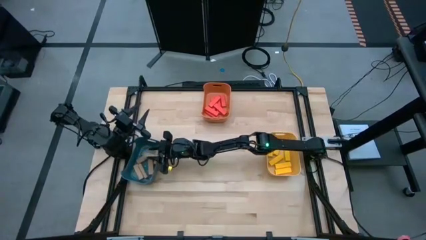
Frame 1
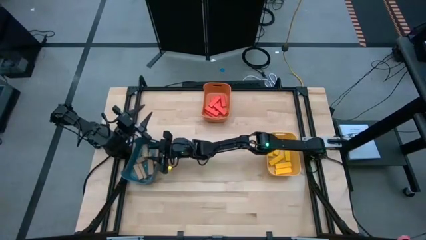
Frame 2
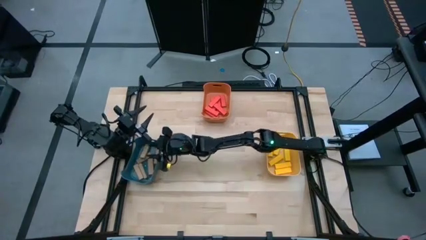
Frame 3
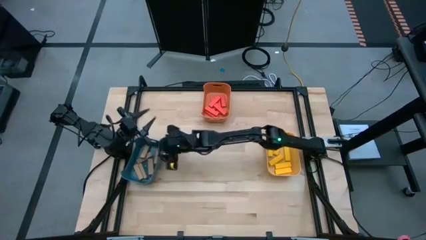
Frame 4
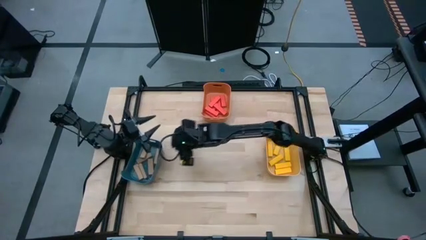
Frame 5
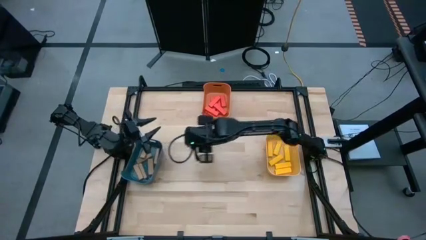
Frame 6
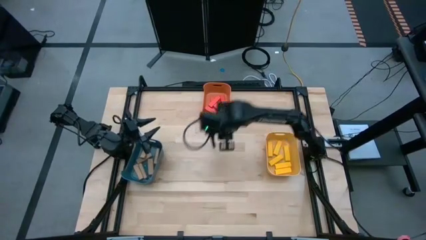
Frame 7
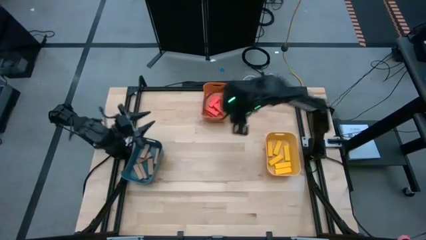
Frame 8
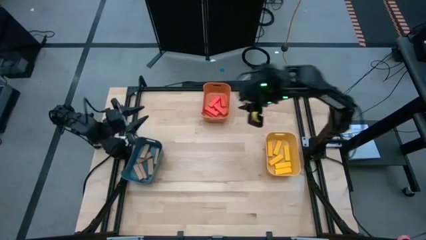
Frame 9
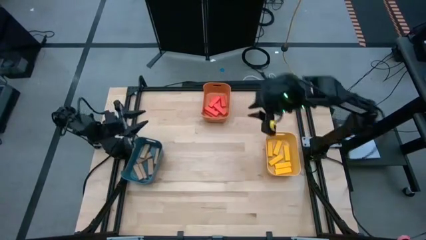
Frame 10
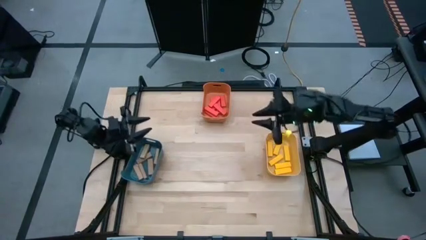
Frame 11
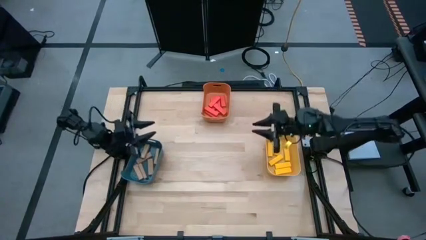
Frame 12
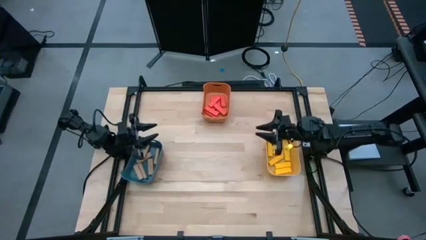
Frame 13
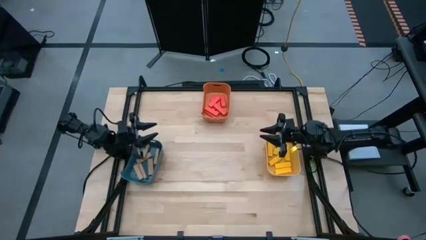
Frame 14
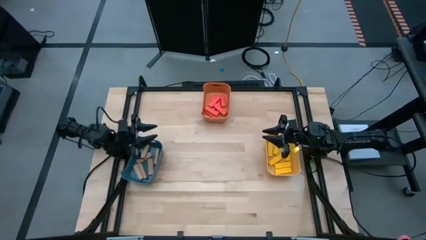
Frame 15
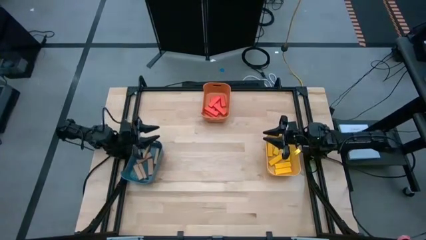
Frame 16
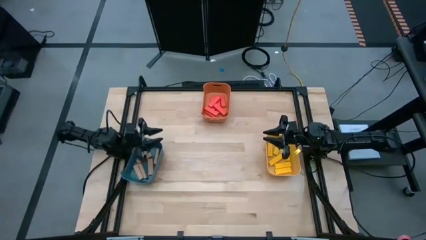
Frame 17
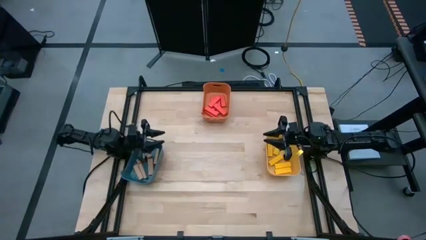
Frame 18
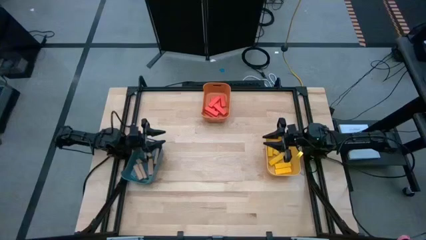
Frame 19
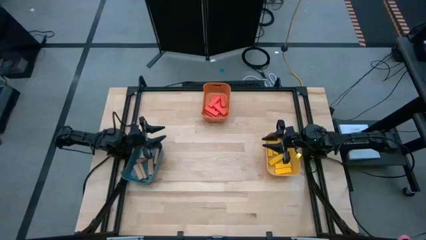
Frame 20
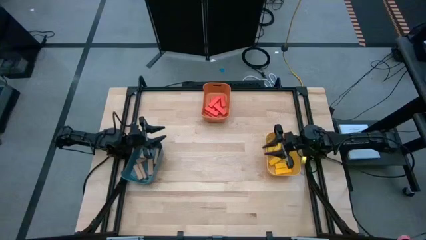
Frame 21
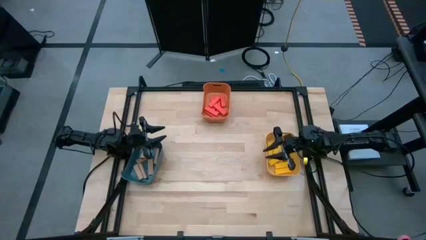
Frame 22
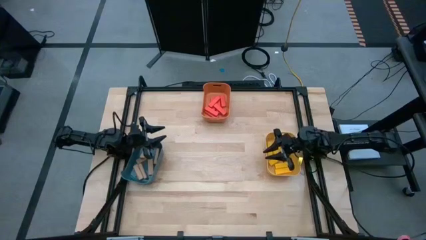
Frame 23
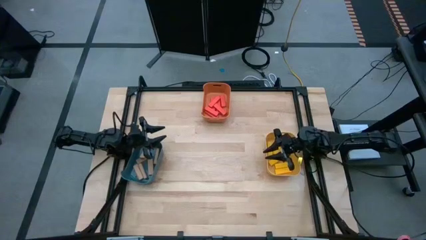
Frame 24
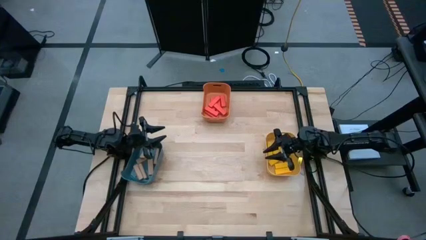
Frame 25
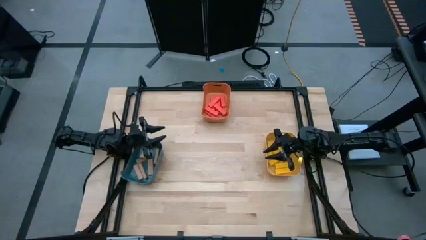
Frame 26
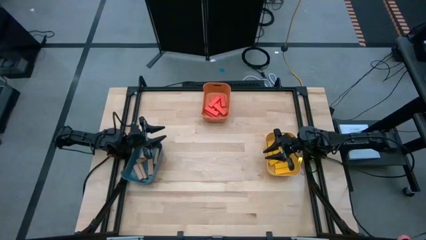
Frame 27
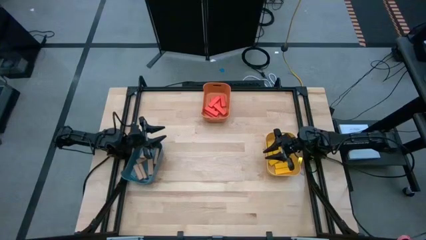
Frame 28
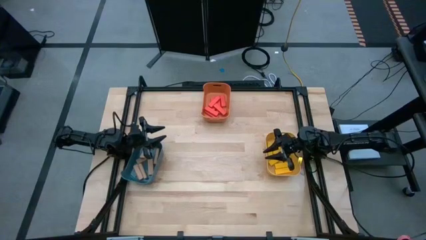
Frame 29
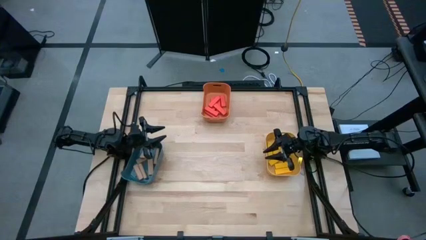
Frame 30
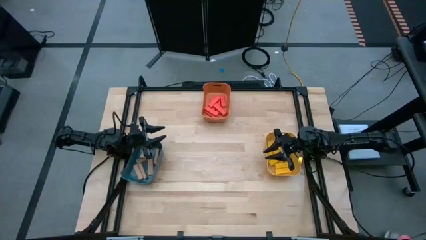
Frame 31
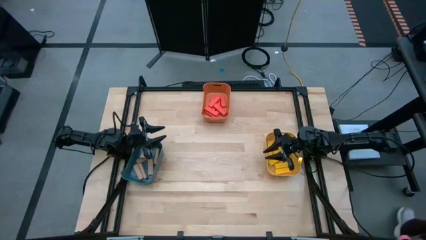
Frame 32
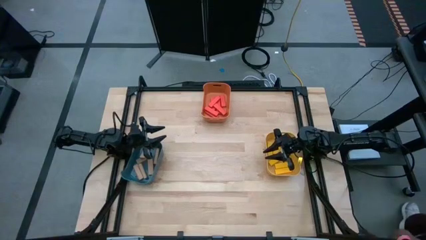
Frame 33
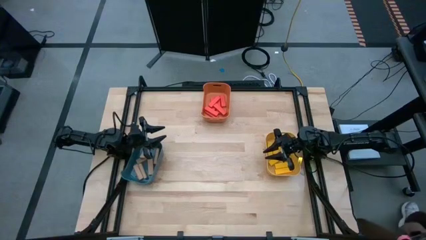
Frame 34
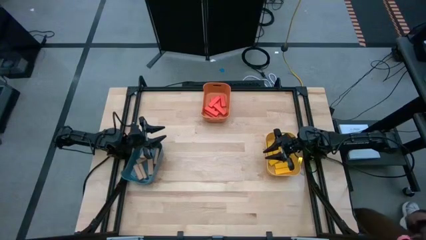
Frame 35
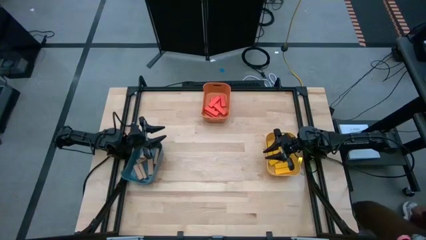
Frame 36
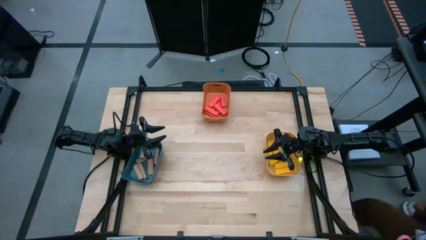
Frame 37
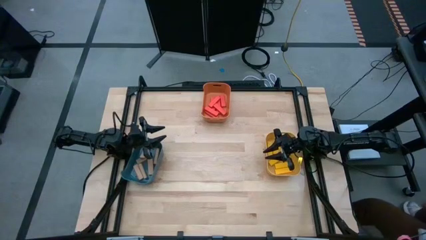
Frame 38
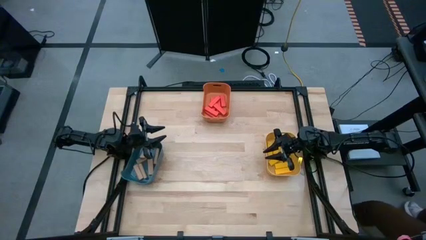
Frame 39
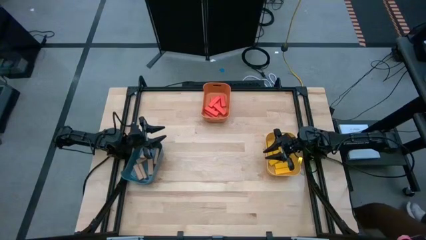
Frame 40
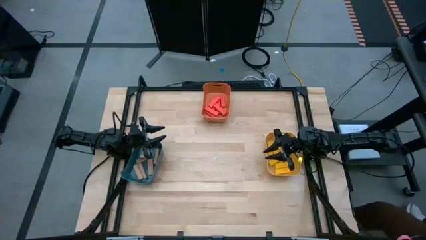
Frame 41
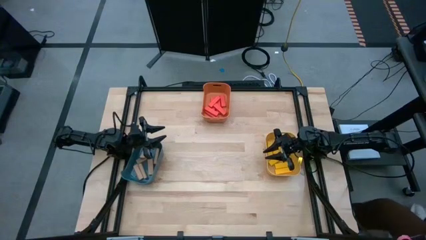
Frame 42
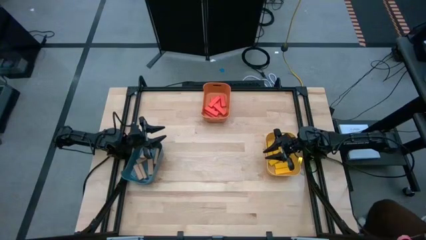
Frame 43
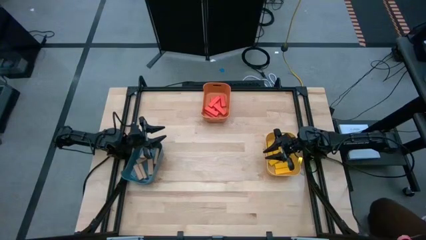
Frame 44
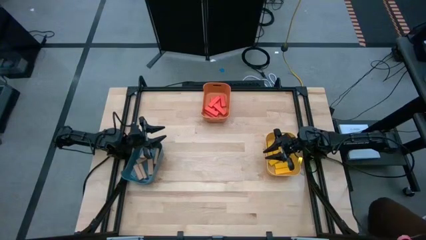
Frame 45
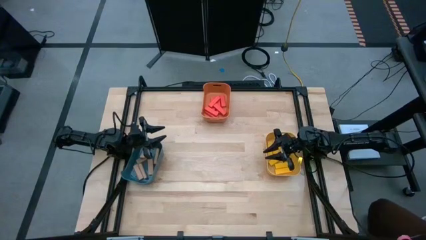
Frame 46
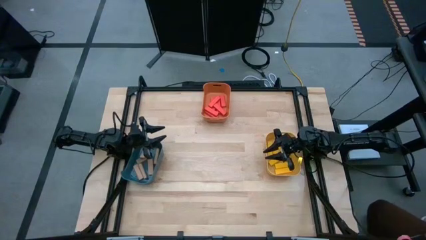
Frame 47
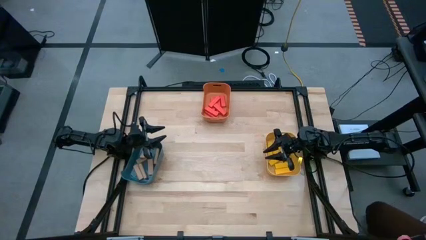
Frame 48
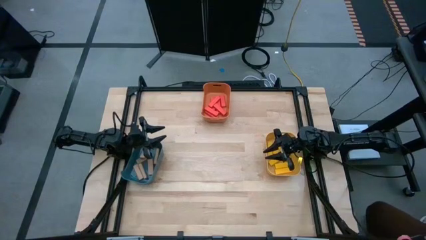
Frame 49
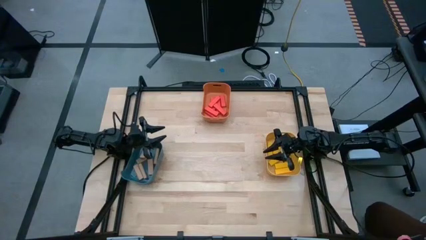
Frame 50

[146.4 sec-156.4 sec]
Task: Sort blocks
Return to Home Position

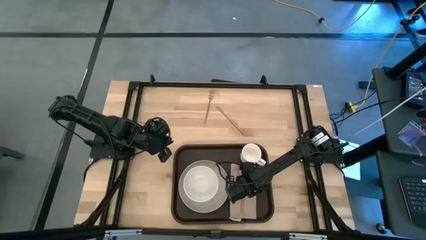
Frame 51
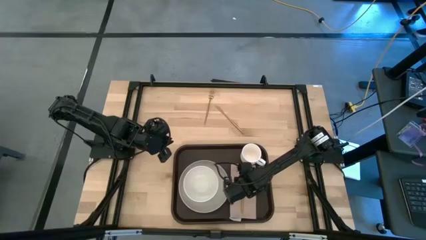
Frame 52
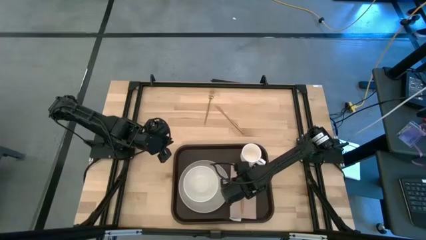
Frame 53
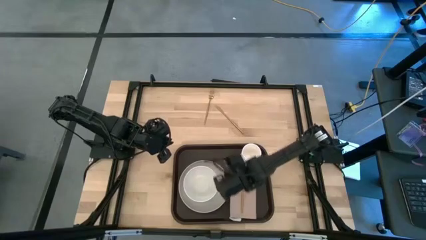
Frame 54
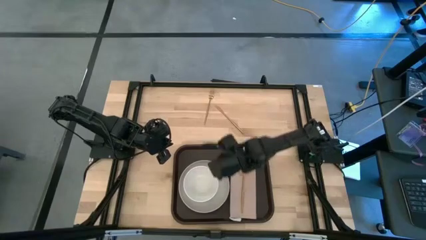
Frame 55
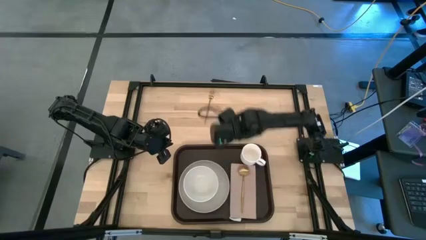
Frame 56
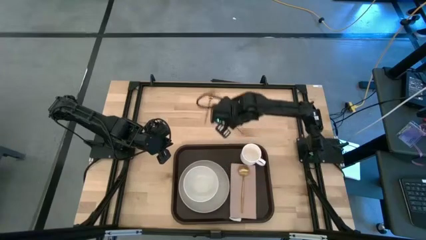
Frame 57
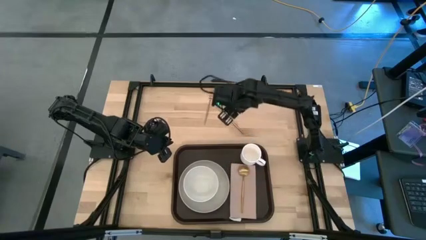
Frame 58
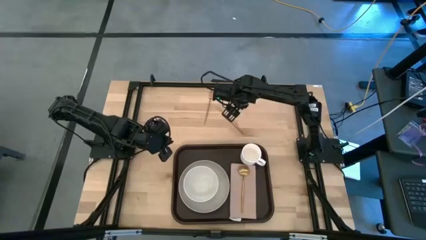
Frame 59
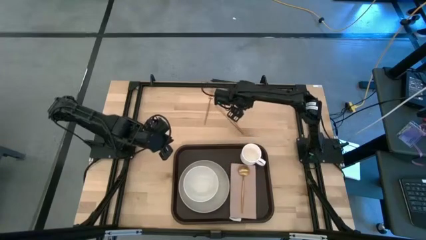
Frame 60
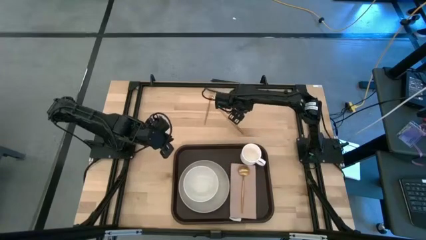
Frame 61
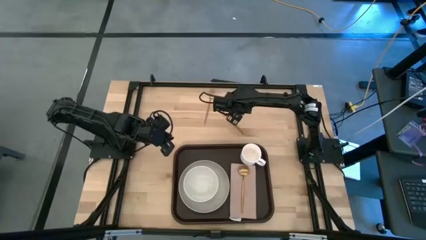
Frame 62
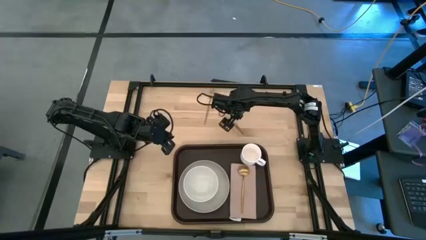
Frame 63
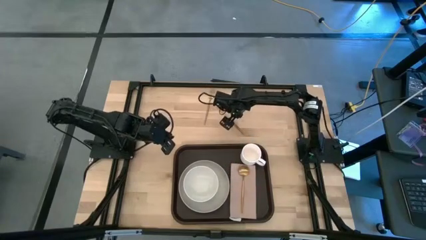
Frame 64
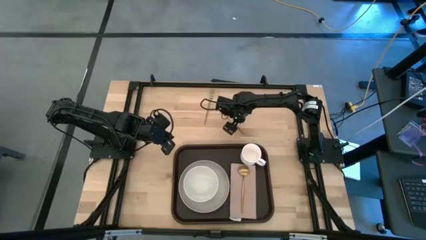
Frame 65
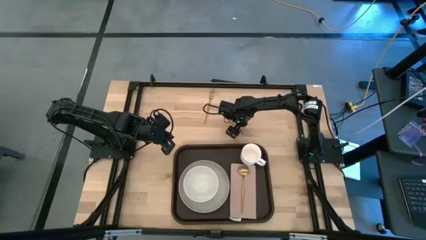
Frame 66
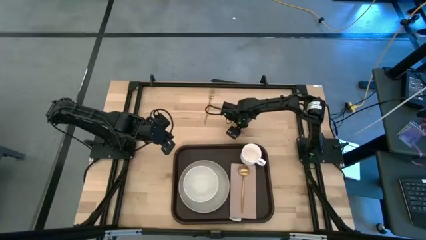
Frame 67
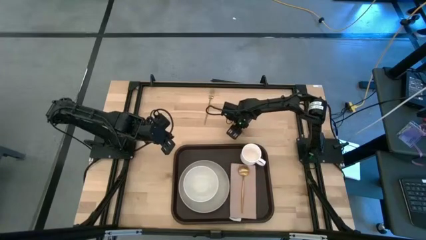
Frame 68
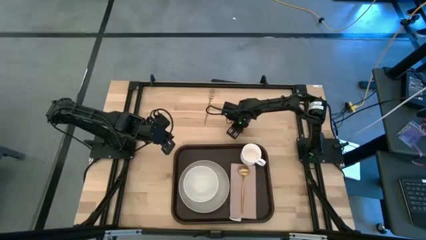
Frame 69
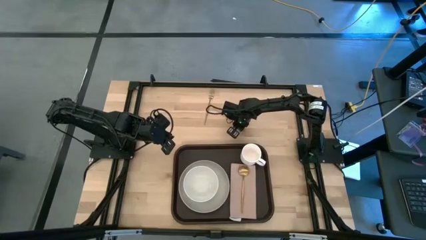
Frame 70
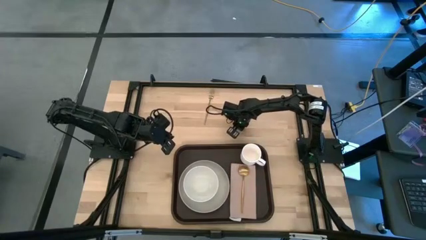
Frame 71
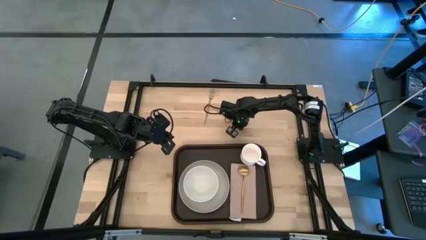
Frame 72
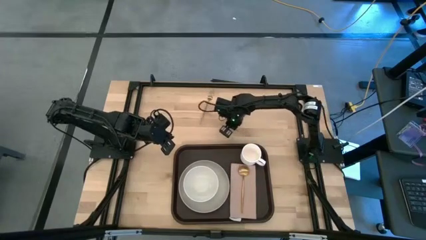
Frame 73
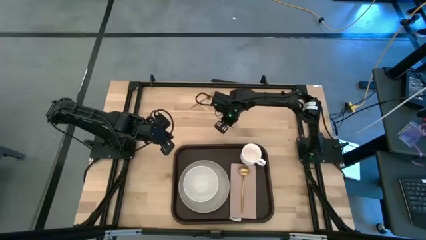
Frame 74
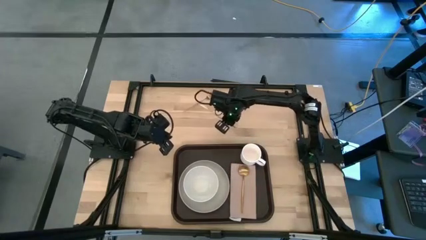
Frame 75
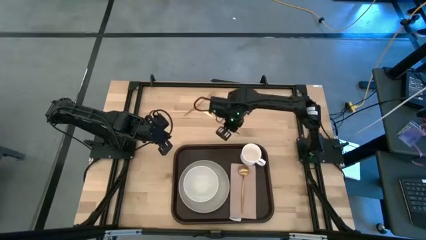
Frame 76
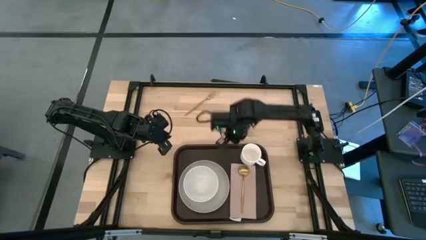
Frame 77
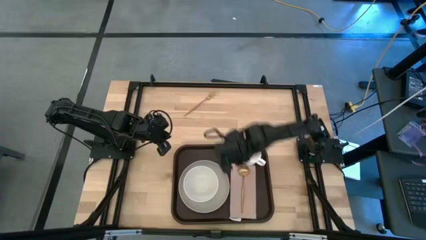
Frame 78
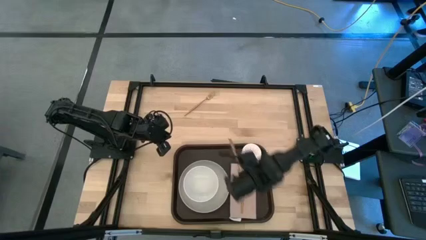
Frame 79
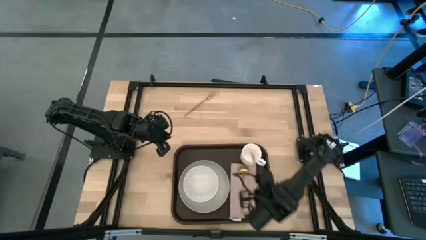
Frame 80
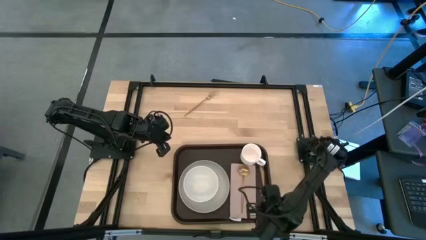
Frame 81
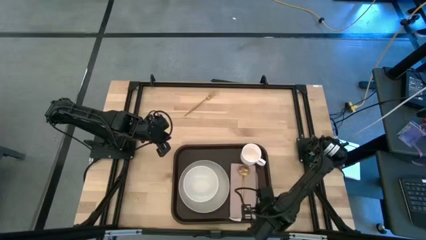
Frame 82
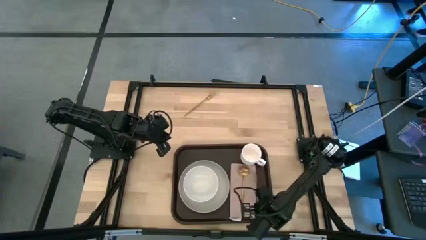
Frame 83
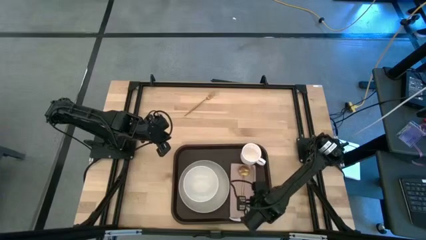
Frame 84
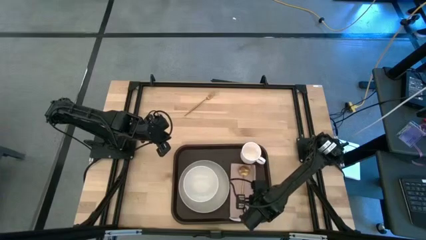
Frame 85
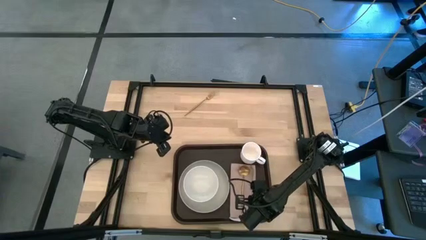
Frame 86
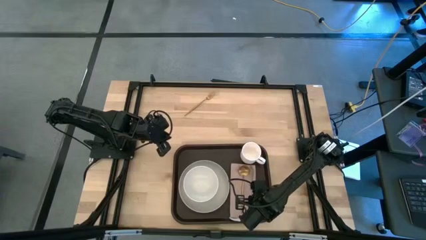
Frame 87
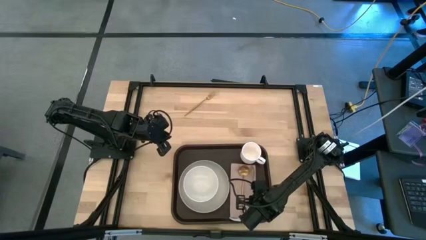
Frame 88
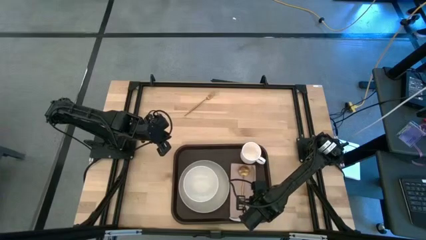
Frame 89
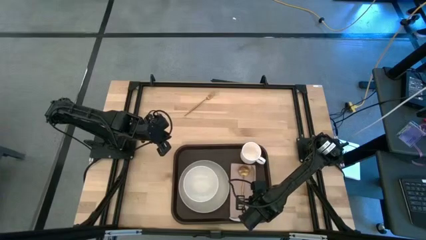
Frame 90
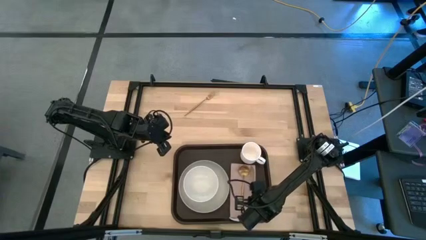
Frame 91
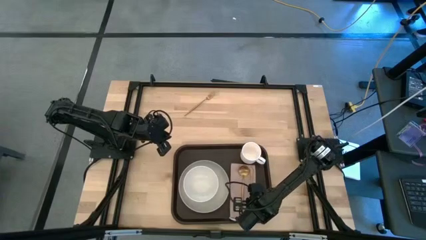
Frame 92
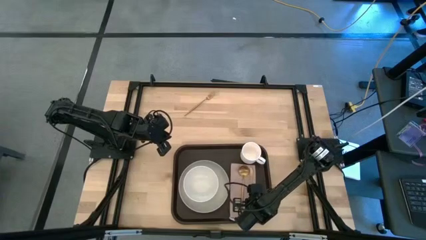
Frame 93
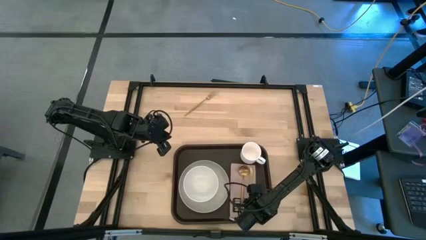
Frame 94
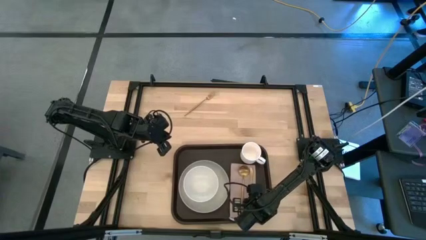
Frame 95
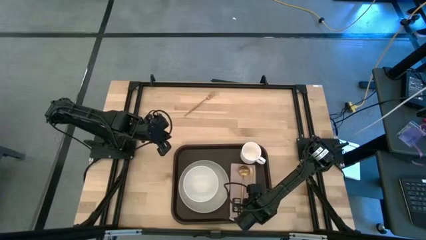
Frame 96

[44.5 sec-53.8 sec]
Task: Set up tray
Put the gold knife on the brown napkin to the right of the gold spoon
